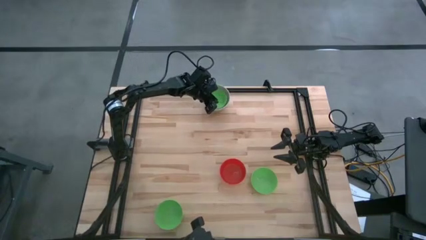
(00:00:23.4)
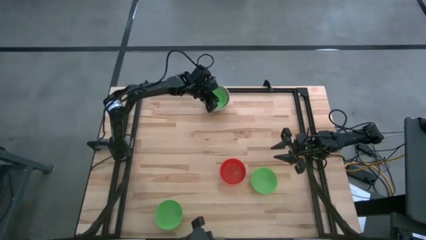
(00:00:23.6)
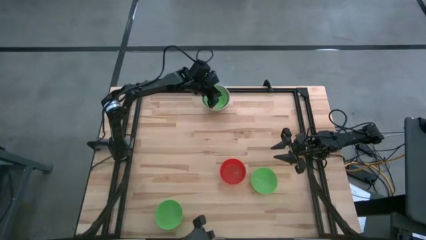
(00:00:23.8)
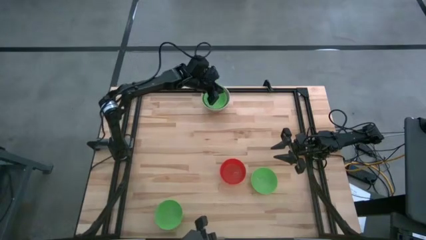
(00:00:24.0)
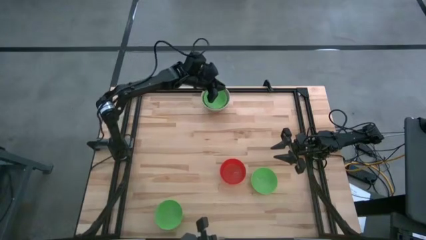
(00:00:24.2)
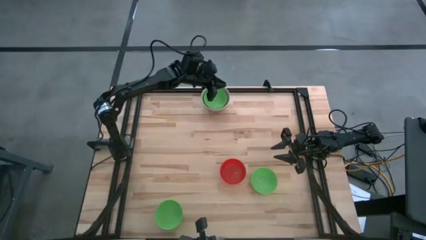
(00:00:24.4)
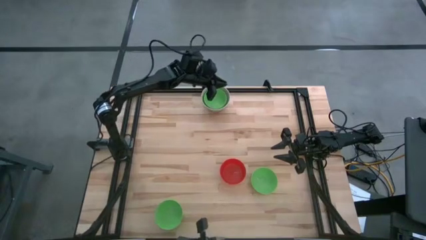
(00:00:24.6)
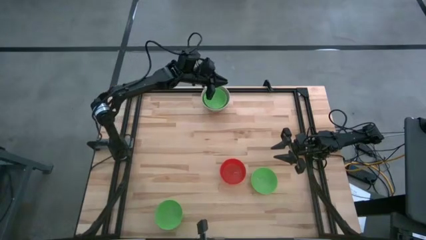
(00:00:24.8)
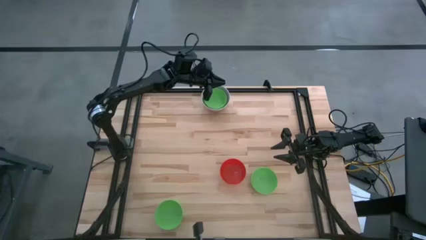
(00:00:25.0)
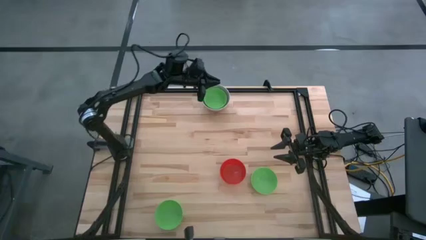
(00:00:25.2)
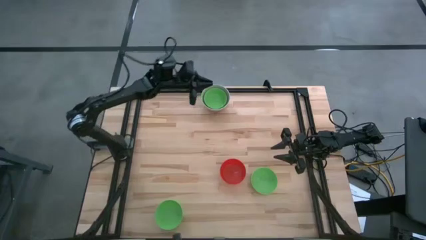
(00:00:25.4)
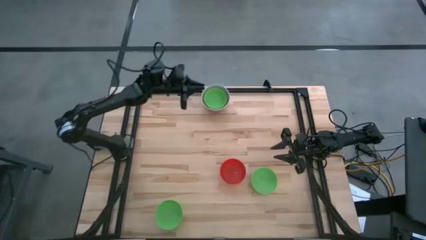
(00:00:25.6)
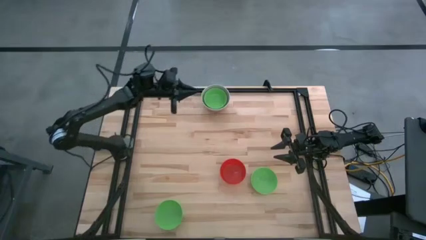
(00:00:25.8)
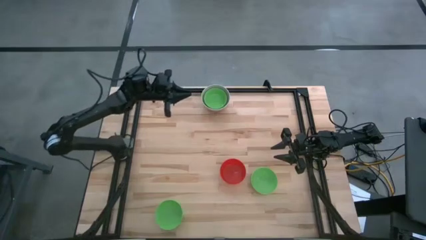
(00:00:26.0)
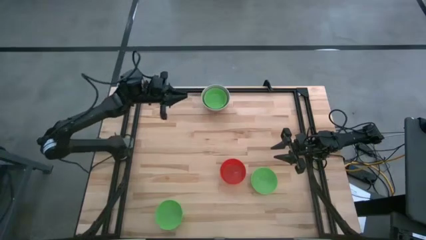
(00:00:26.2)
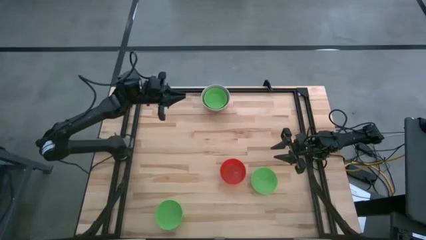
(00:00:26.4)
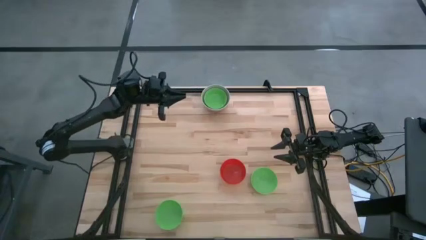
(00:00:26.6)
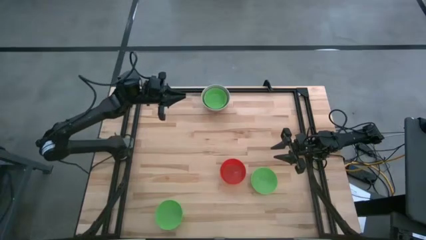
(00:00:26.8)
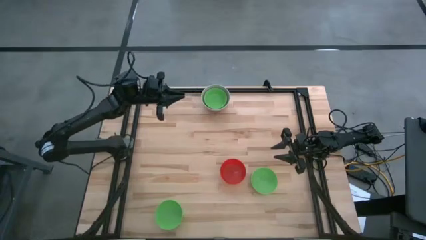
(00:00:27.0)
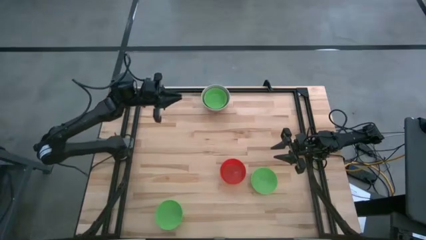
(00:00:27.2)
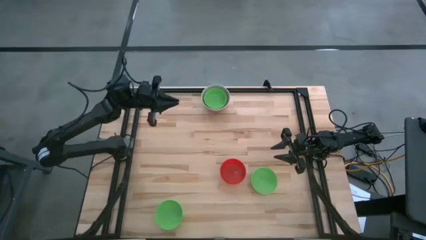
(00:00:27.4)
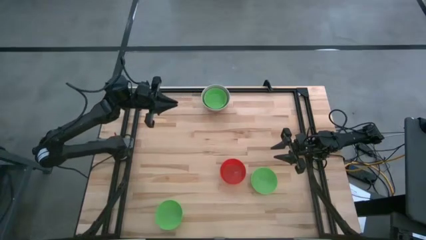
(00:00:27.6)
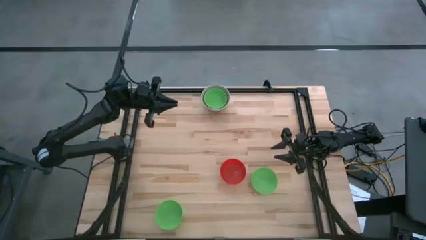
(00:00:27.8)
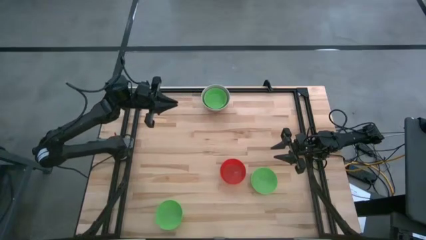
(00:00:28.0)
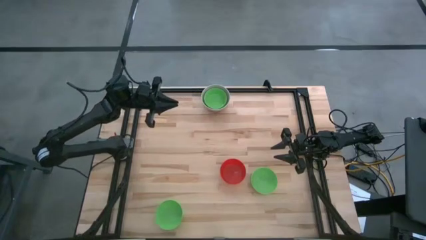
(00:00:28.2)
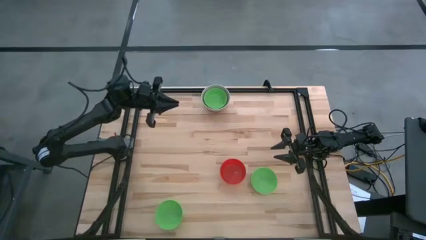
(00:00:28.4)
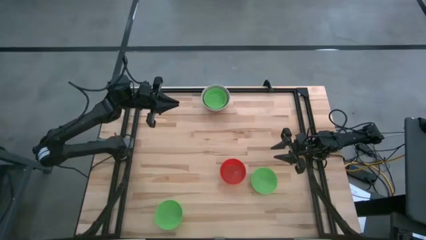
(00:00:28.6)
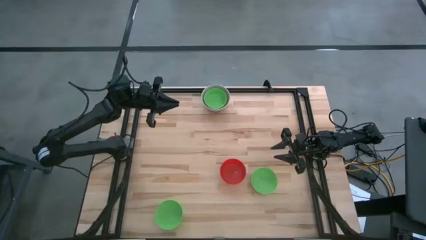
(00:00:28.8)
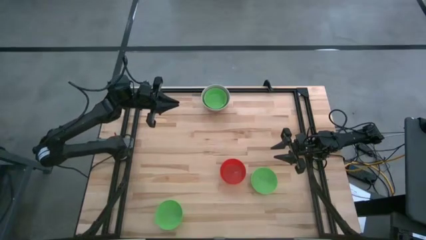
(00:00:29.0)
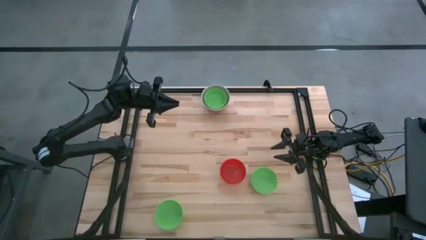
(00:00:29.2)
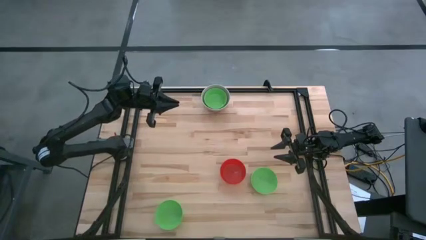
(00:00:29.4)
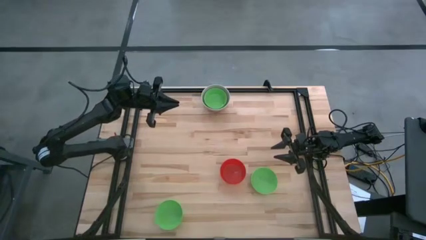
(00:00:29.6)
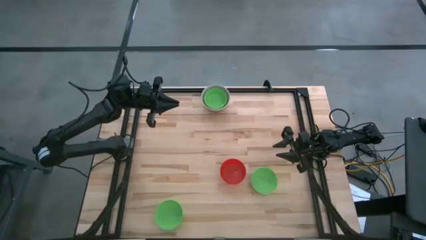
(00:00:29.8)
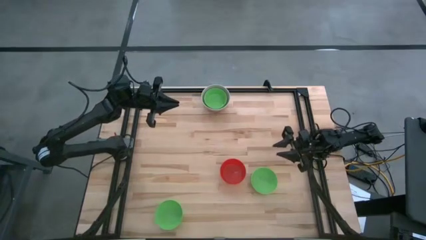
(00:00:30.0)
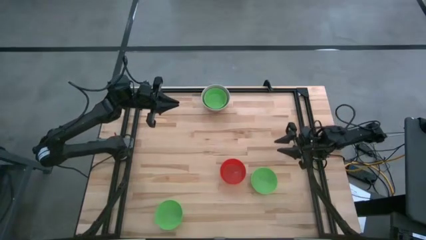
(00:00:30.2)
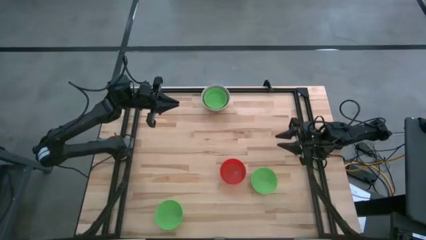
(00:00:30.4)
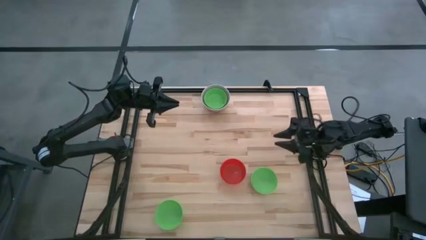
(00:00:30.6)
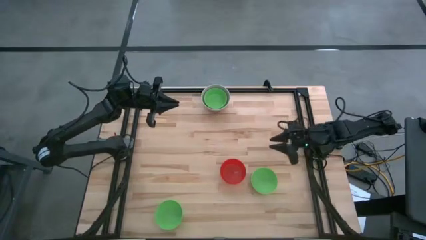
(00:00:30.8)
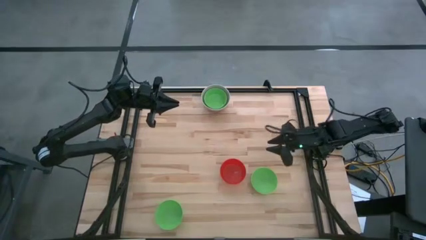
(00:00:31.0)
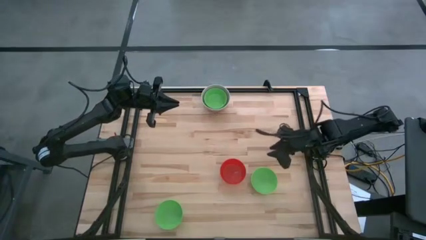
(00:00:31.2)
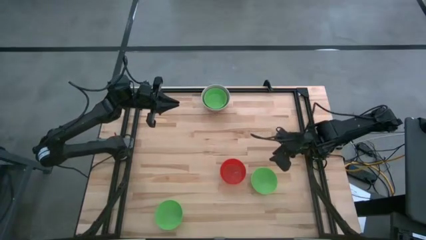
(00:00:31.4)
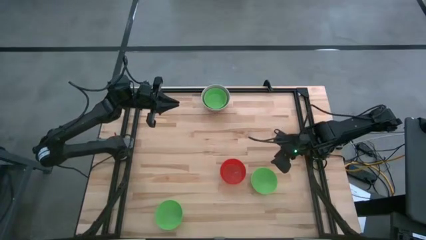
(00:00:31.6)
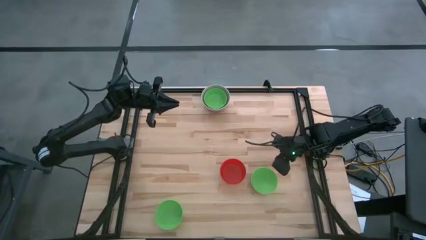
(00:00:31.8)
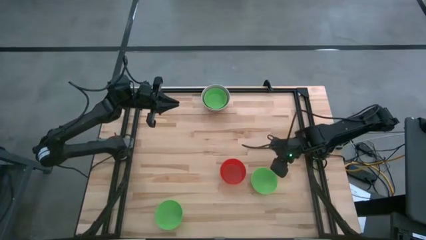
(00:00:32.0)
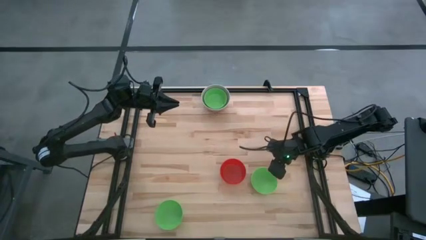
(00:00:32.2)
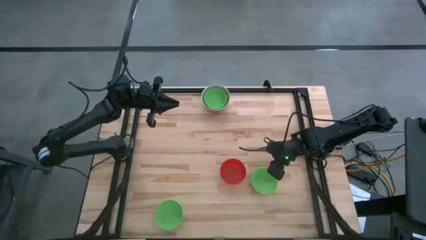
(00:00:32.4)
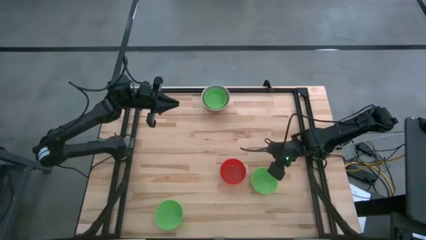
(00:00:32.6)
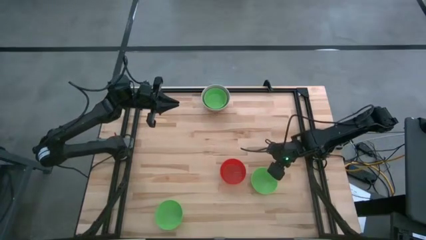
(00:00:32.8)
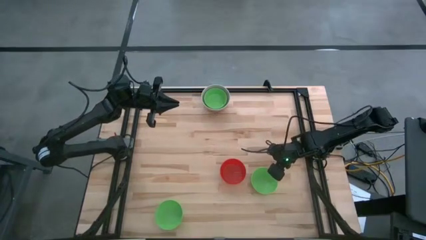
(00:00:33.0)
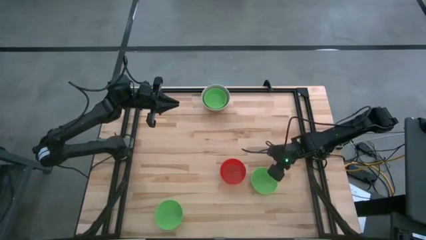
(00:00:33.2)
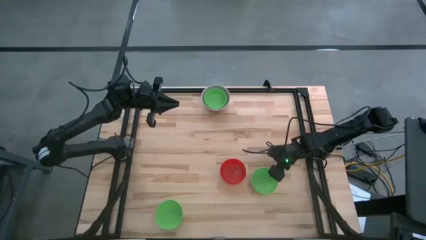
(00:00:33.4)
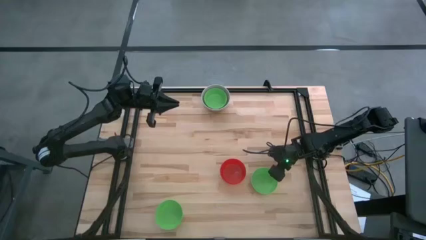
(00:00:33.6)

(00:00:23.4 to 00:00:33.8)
Stack the right green bowl on top of the stacked green bowl
